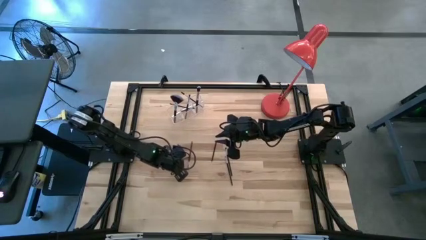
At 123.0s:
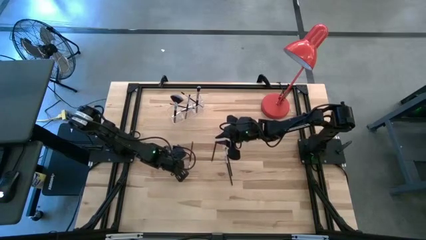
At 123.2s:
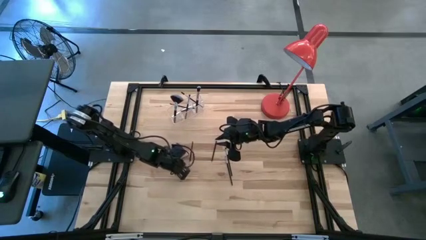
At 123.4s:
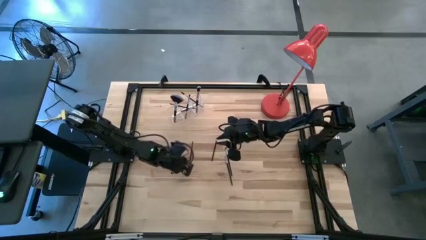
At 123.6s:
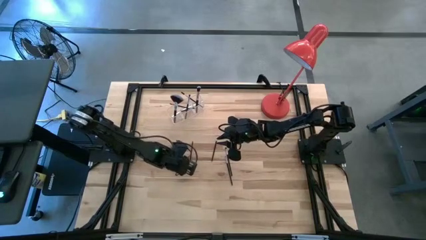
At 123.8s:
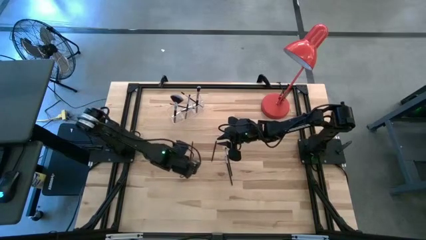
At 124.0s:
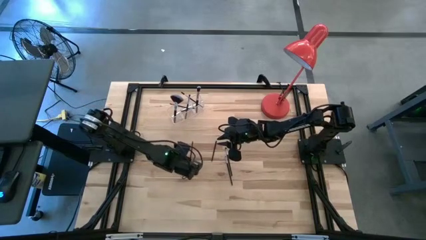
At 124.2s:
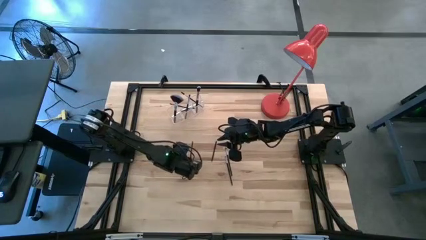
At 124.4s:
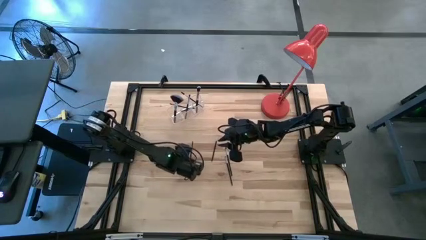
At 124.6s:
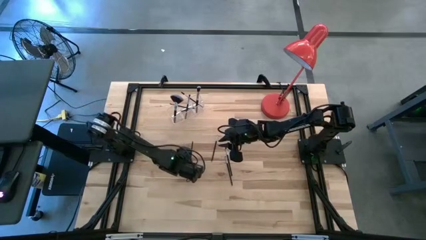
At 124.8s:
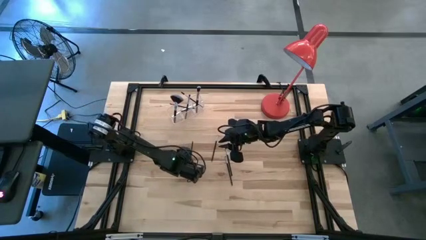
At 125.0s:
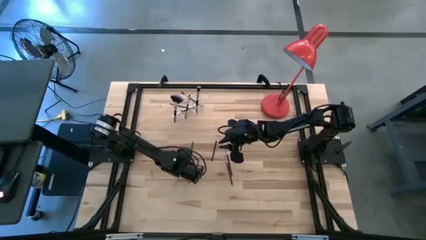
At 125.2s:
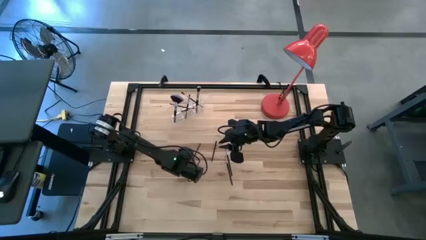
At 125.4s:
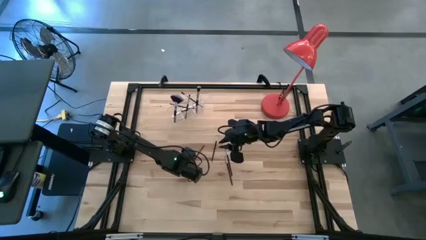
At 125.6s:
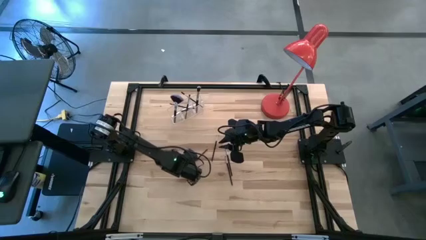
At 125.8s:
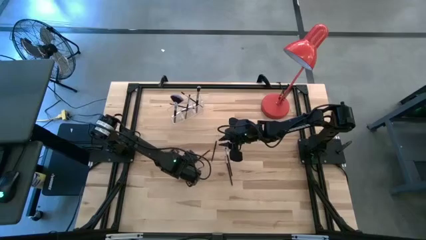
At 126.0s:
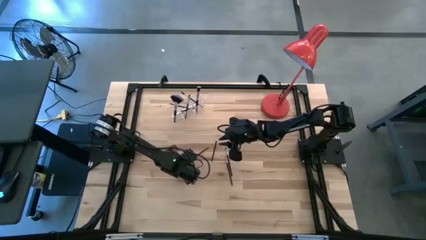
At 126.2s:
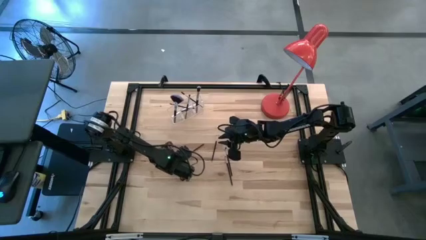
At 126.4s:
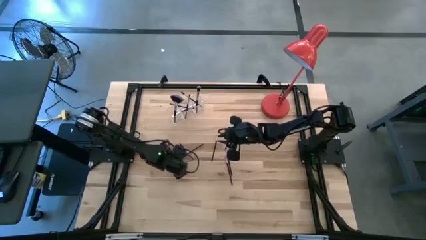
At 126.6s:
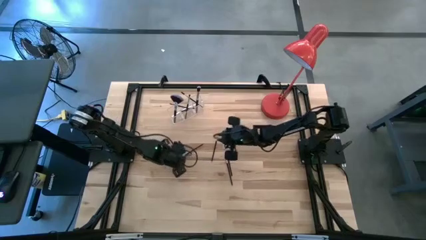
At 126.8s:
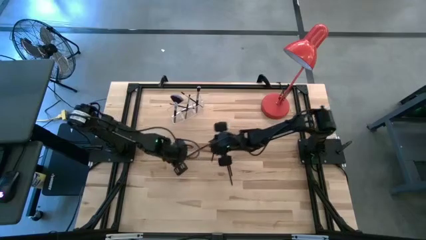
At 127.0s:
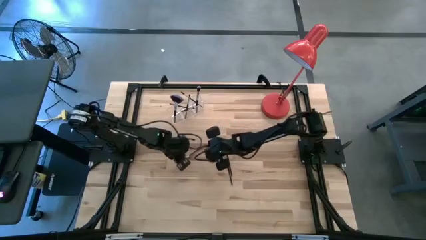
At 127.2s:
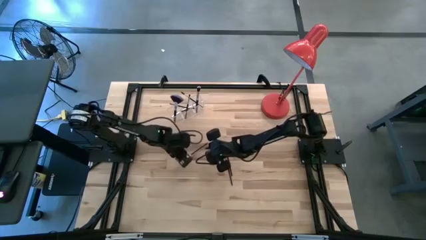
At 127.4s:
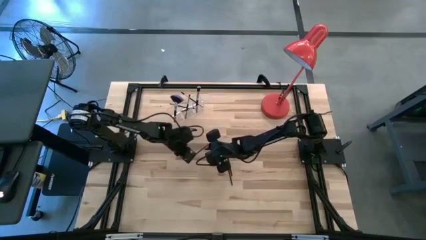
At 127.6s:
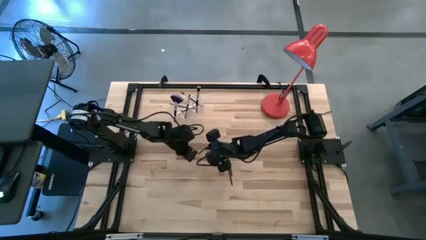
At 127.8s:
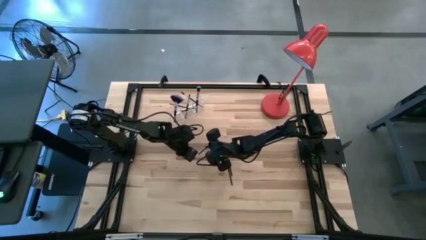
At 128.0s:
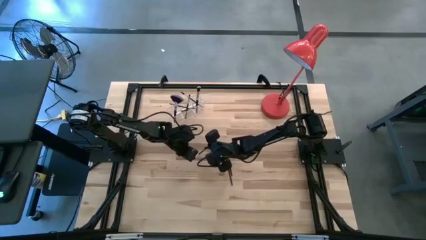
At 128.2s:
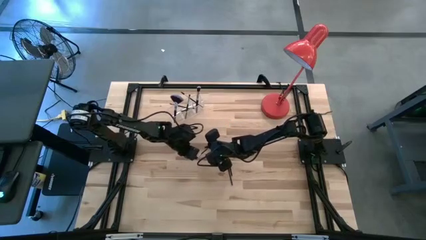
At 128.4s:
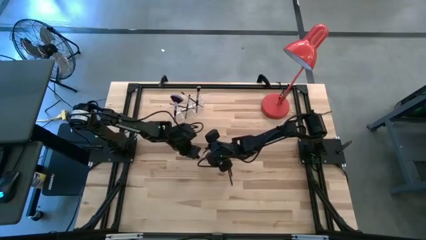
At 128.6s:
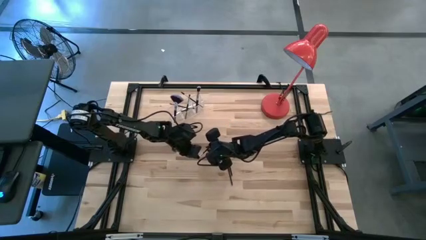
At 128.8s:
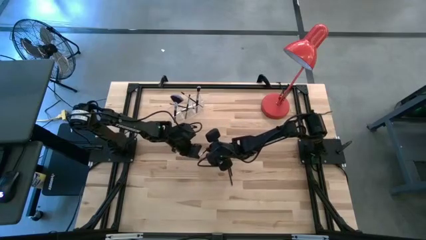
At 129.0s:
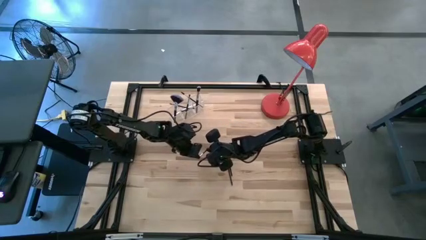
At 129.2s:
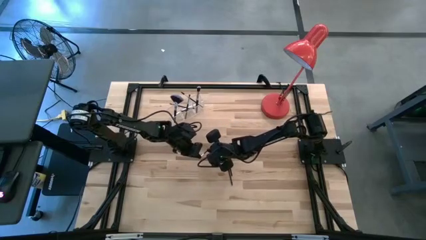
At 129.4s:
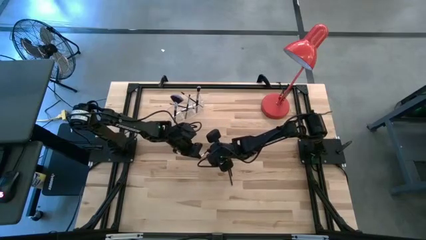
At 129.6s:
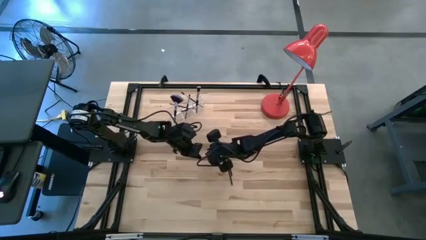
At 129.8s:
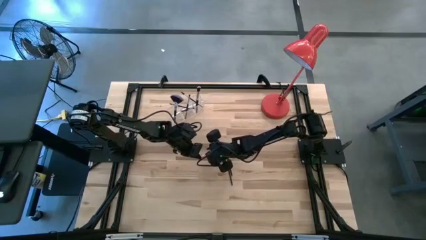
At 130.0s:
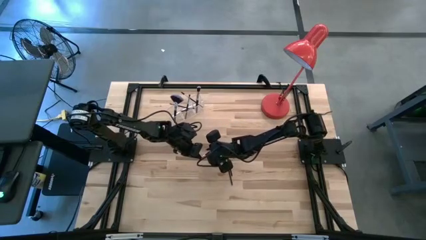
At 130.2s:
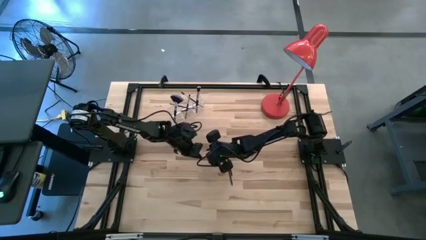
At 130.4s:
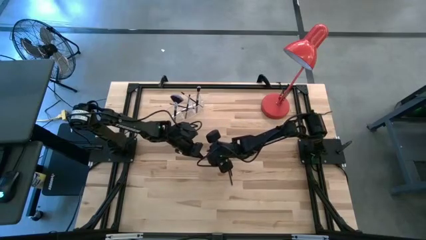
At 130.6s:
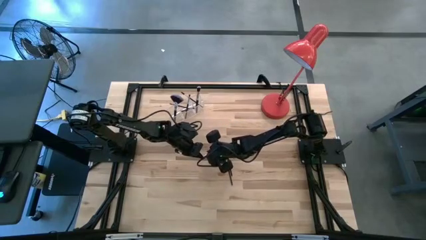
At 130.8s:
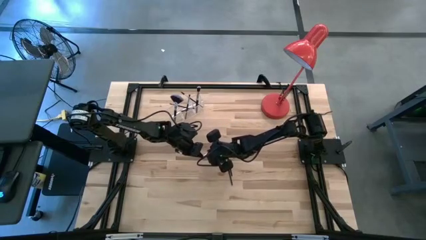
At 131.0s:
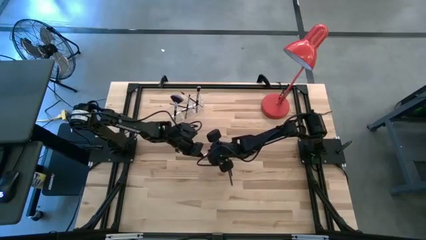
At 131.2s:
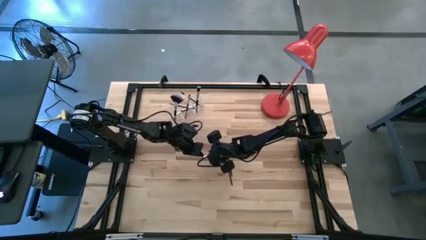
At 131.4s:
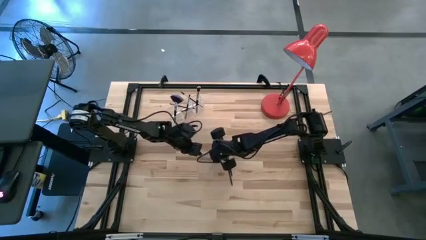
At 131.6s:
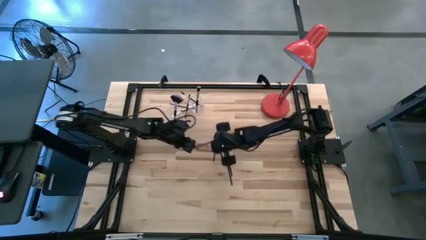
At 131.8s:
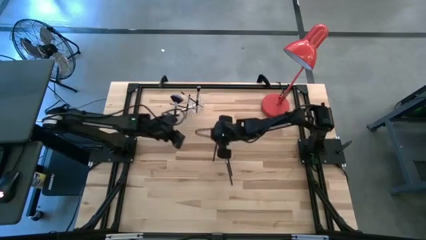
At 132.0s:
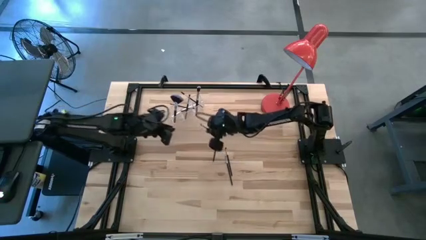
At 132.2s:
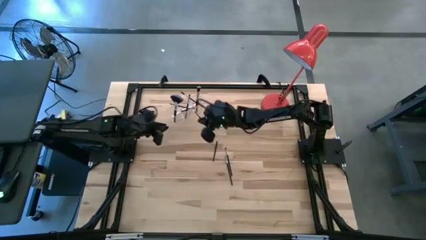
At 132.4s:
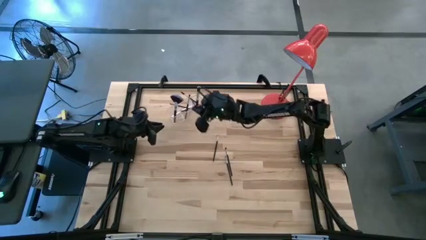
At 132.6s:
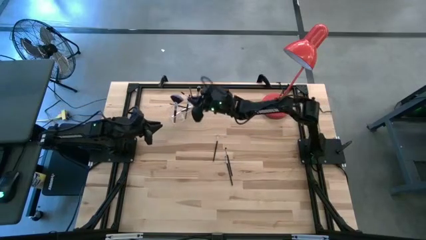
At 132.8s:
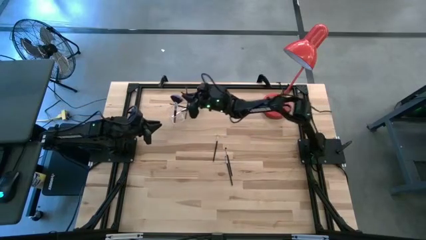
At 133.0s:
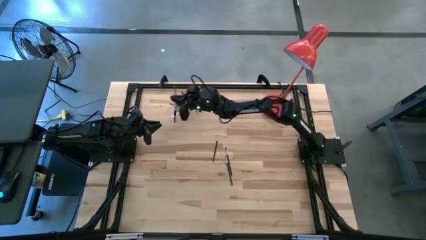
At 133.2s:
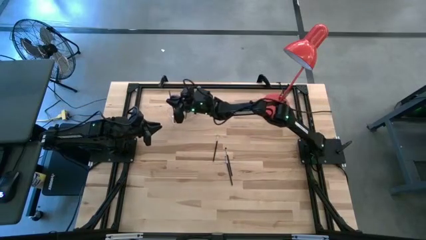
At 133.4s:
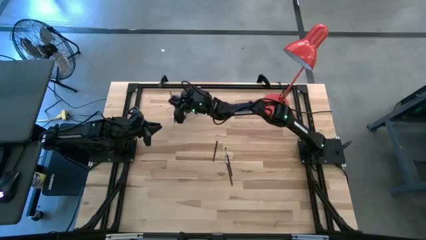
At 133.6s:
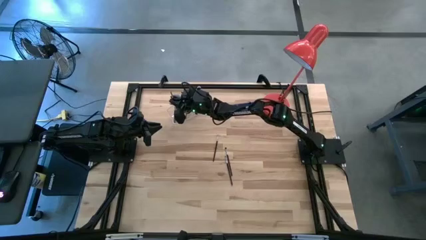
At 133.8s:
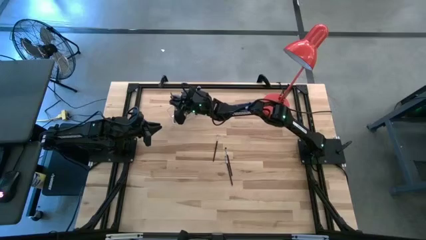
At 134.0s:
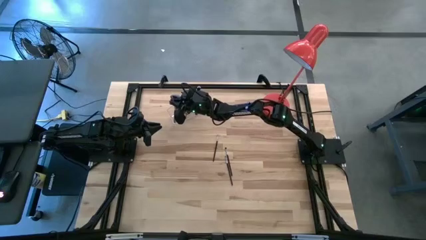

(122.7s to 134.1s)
Task: Put items in baskets/containers
Put the eyeshadow brush into the transparent organizer

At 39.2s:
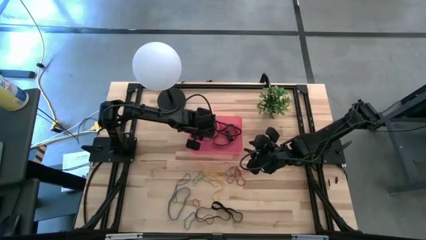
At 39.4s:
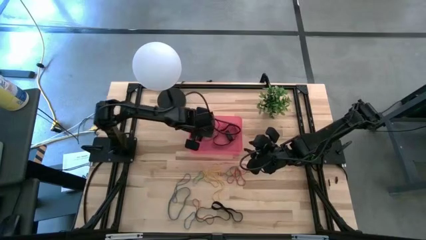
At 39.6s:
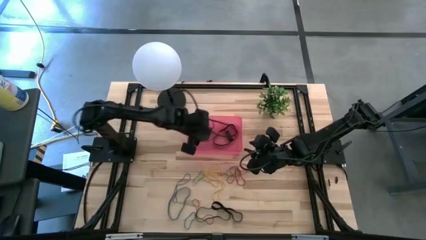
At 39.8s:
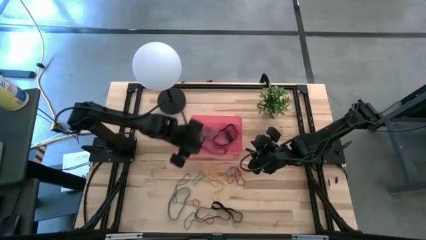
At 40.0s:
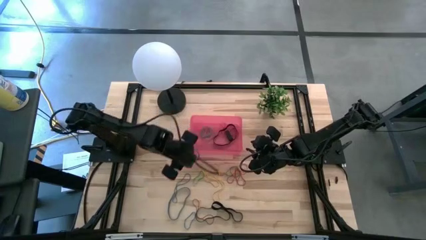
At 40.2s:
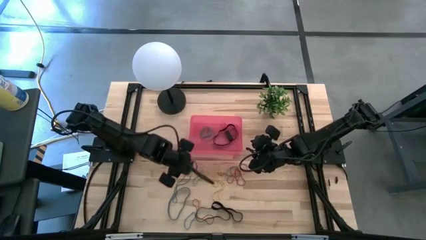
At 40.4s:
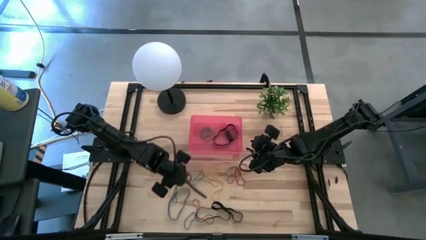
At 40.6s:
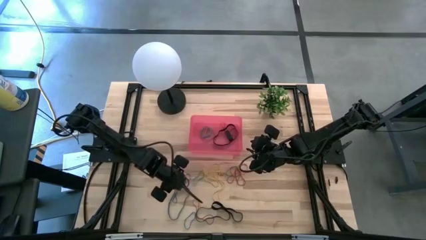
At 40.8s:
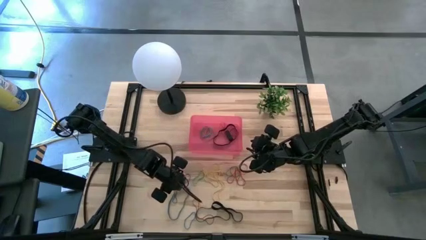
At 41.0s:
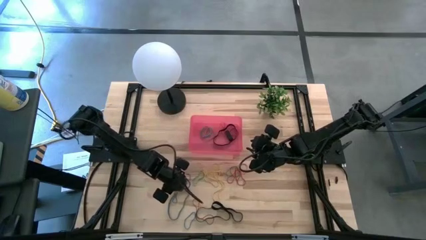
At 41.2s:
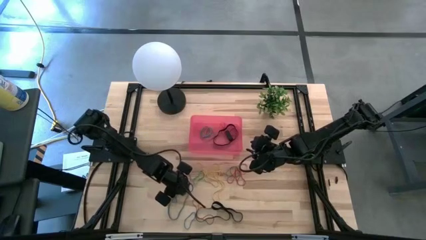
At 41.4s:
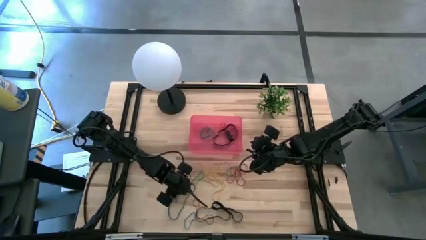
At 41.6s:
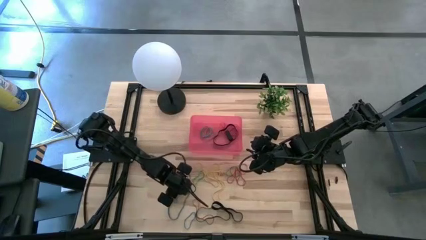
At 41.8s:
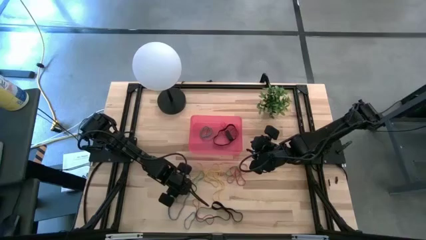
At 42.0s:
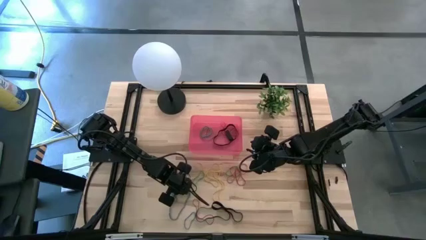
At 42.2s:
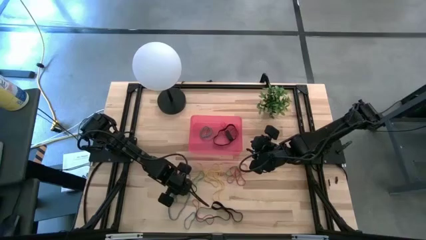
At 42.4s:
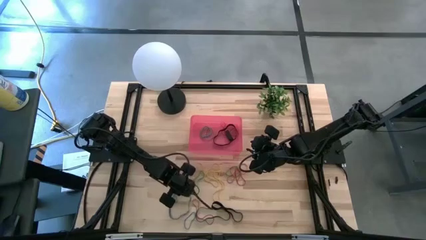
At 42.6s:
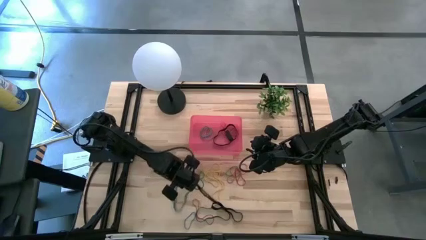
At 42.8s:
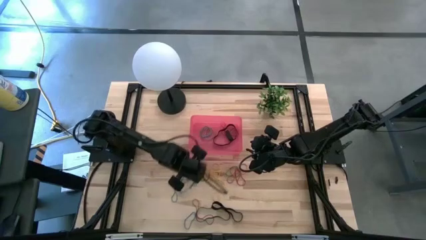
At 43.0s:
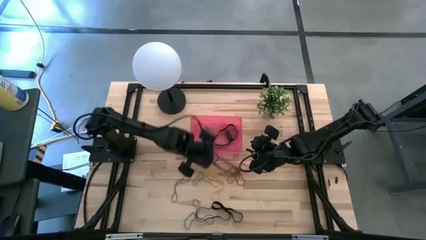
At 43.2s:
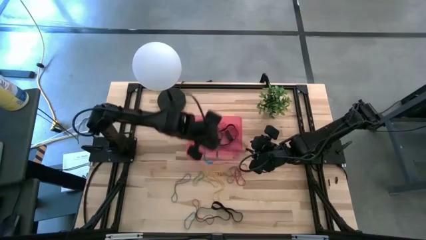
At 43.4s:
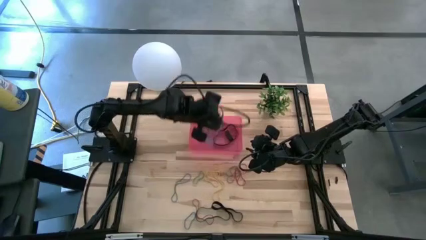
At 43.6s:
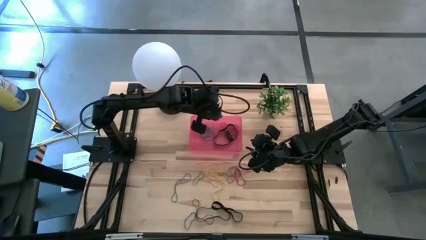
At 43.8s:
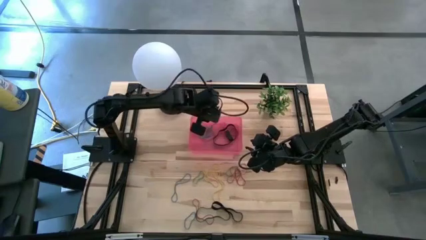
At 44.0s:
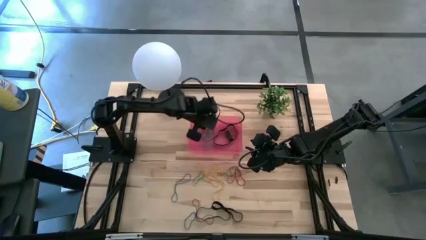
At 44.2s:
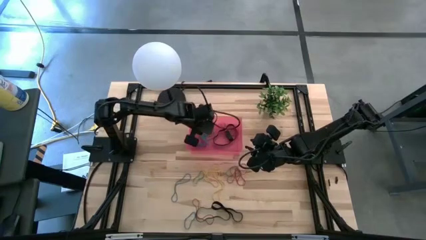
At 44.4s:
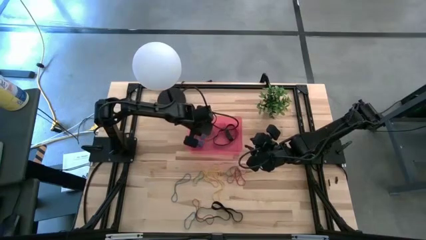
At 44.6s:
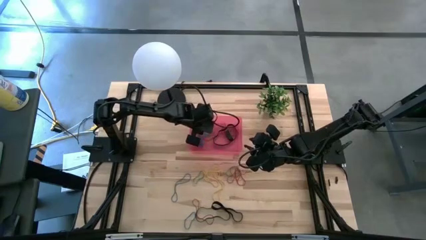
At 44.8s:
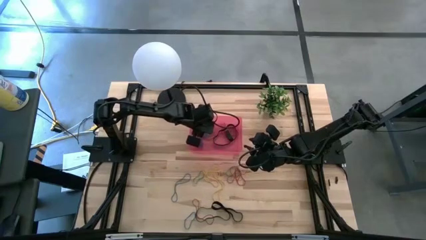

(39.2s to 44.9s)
Task: Pick and place rubber bands into bin
Put the blue rubber band into the red bin
